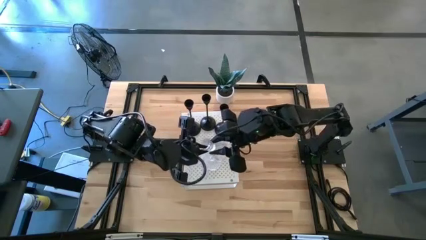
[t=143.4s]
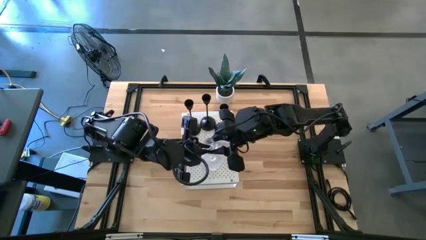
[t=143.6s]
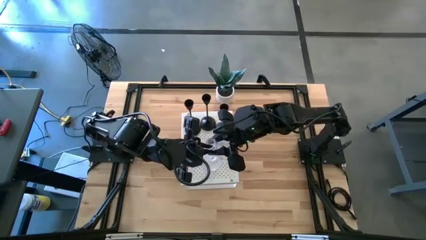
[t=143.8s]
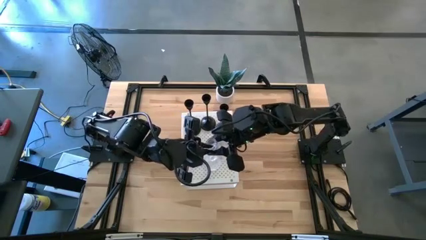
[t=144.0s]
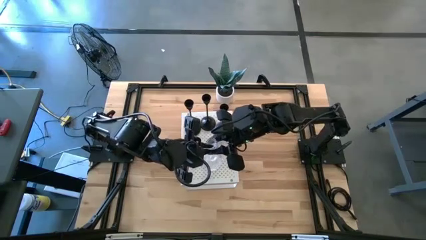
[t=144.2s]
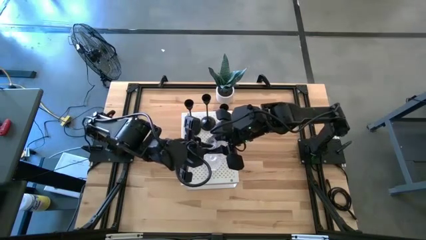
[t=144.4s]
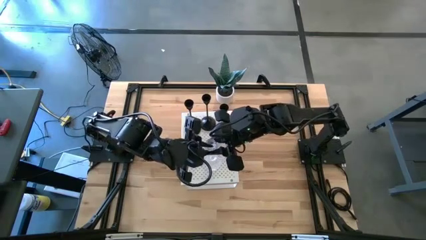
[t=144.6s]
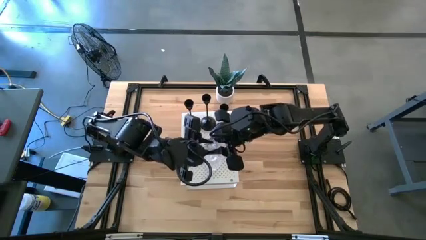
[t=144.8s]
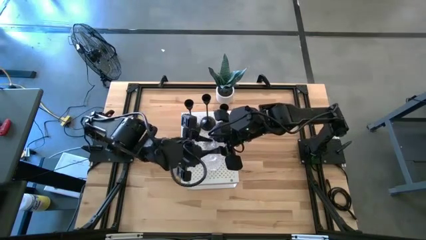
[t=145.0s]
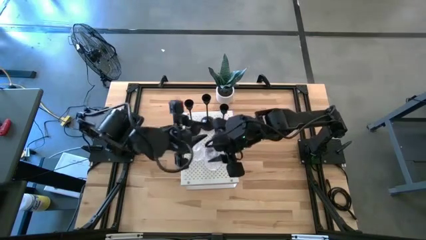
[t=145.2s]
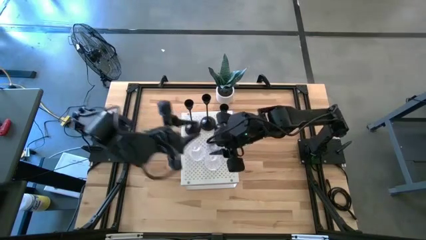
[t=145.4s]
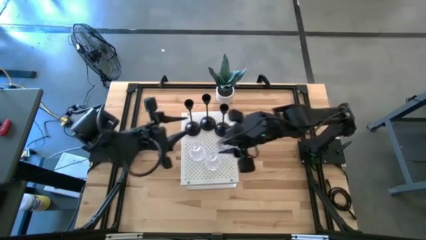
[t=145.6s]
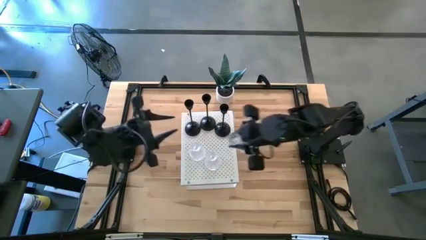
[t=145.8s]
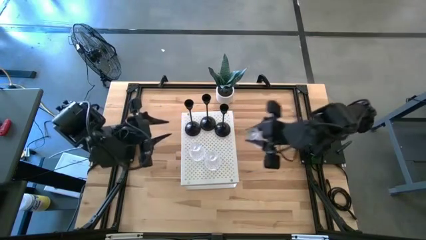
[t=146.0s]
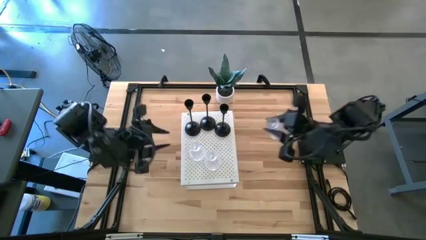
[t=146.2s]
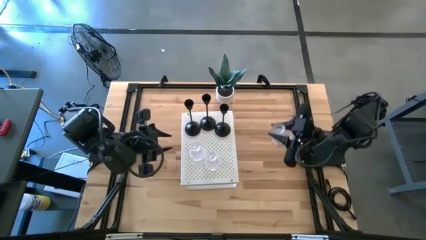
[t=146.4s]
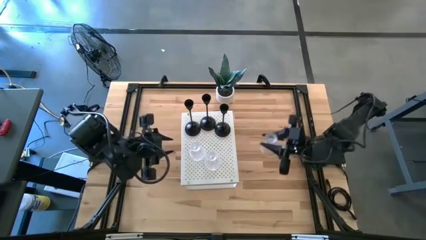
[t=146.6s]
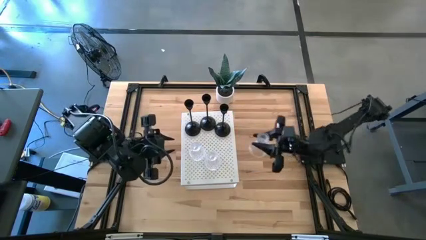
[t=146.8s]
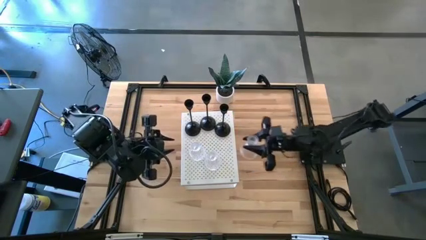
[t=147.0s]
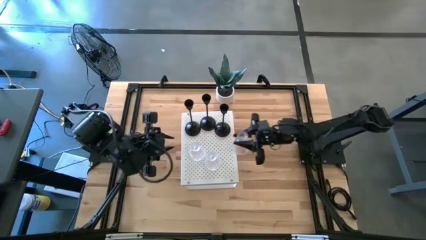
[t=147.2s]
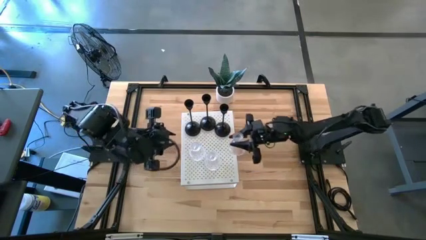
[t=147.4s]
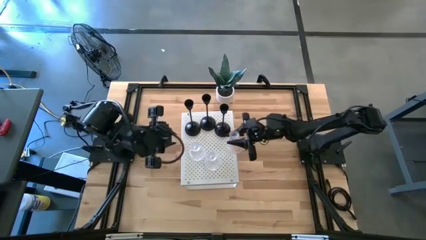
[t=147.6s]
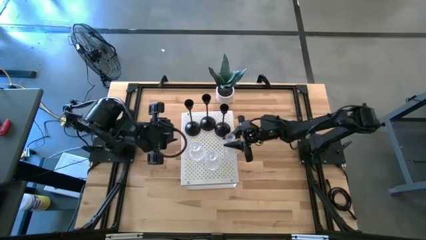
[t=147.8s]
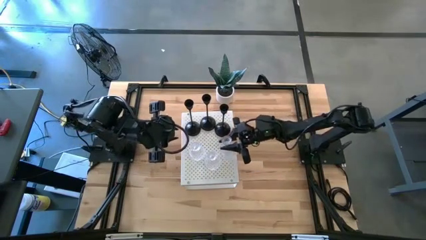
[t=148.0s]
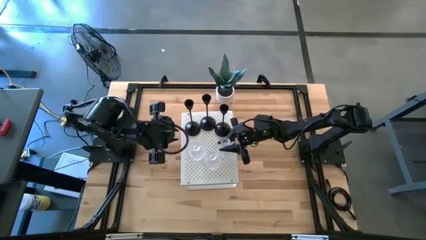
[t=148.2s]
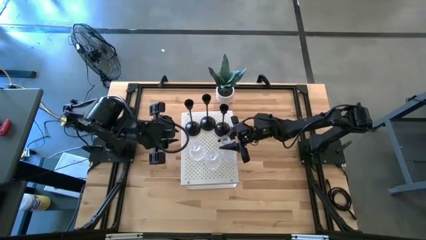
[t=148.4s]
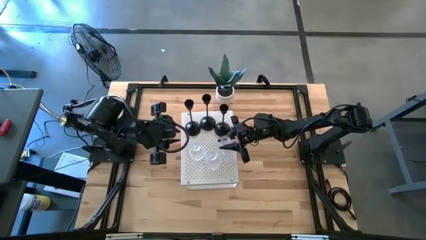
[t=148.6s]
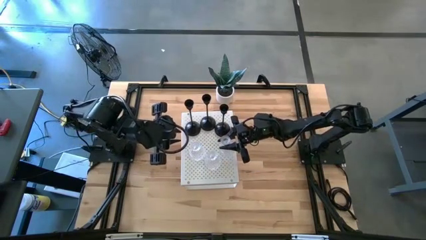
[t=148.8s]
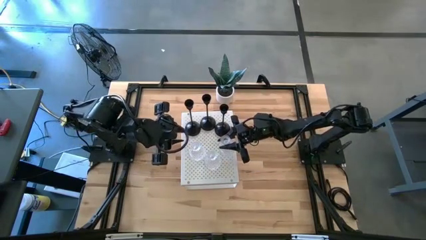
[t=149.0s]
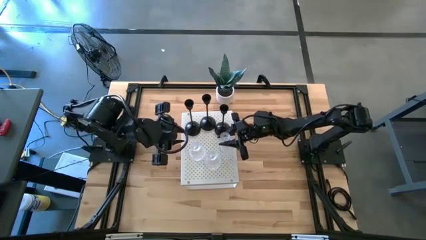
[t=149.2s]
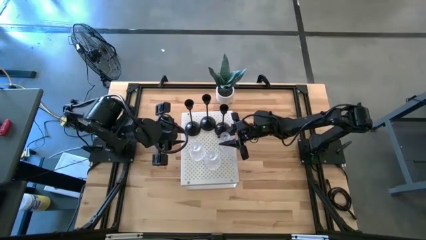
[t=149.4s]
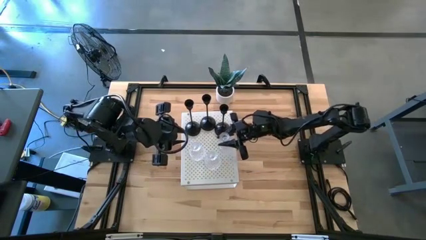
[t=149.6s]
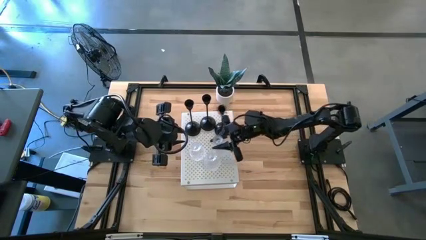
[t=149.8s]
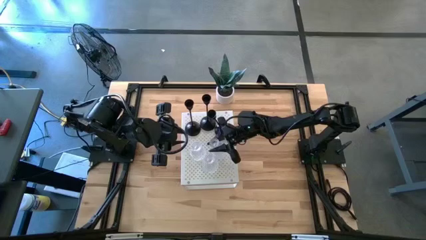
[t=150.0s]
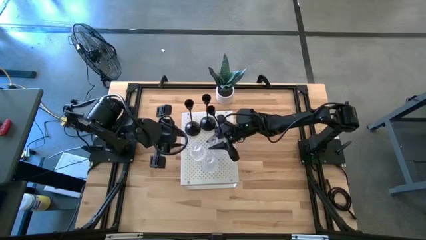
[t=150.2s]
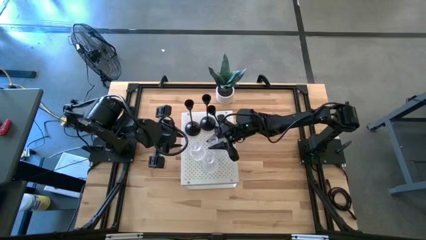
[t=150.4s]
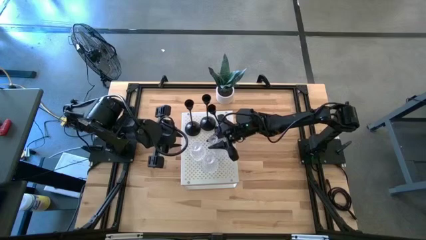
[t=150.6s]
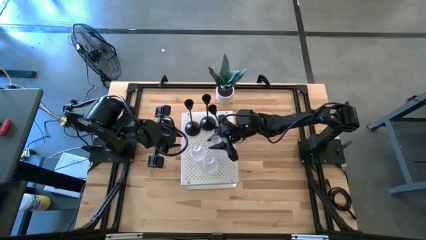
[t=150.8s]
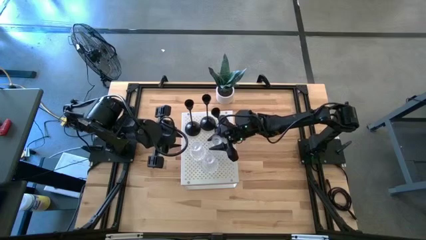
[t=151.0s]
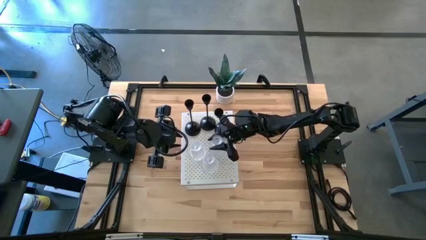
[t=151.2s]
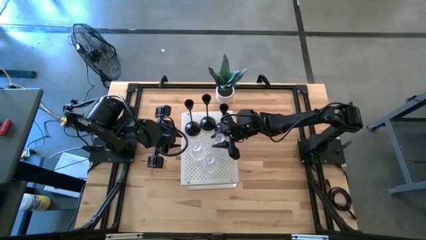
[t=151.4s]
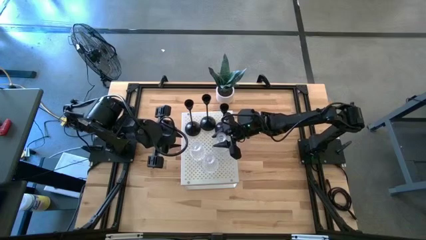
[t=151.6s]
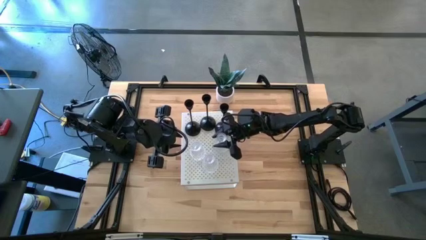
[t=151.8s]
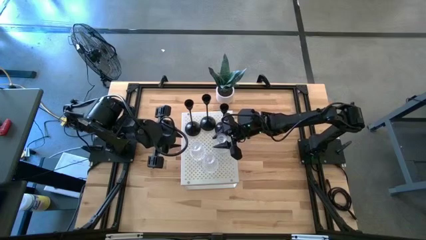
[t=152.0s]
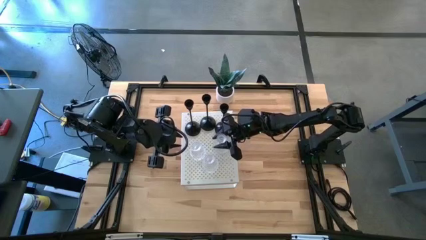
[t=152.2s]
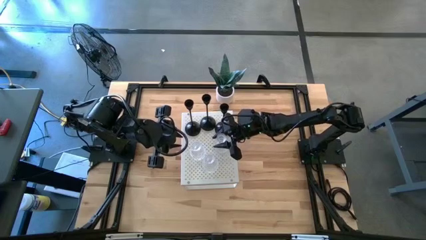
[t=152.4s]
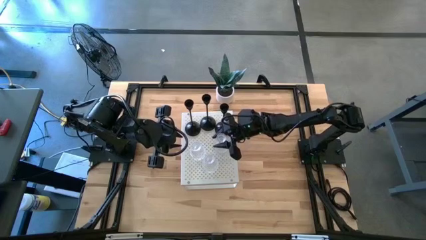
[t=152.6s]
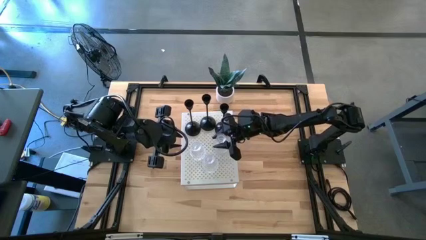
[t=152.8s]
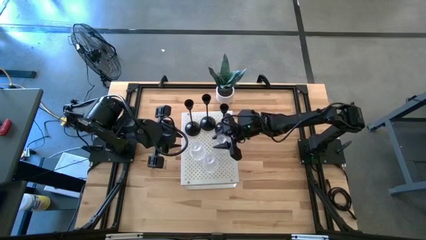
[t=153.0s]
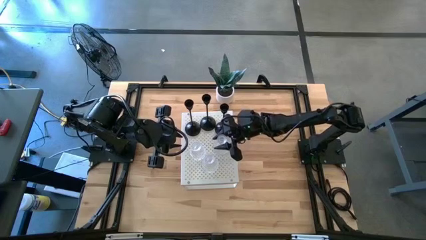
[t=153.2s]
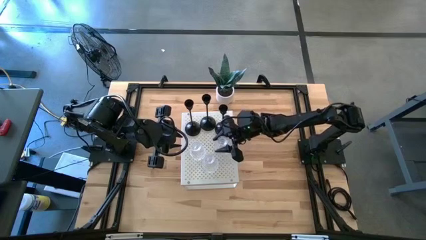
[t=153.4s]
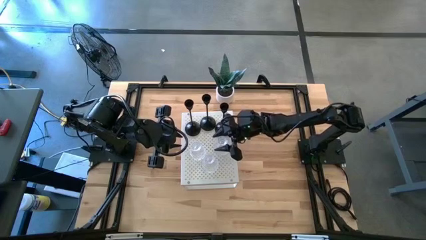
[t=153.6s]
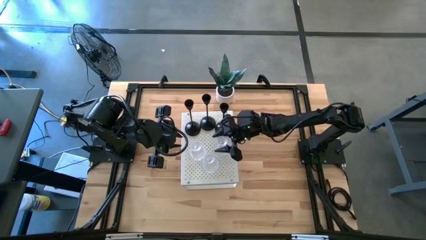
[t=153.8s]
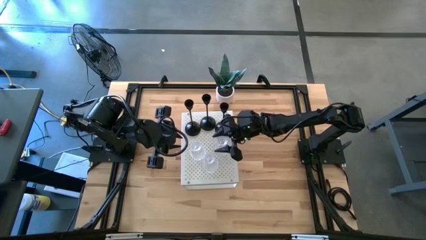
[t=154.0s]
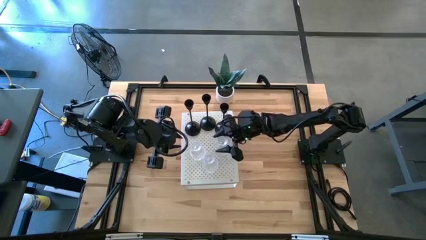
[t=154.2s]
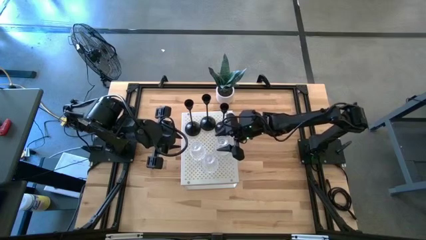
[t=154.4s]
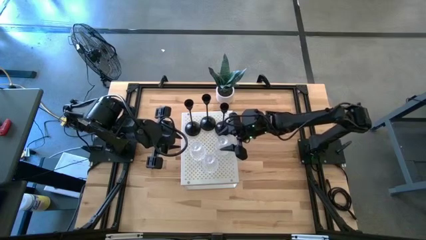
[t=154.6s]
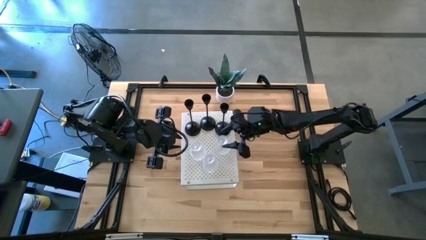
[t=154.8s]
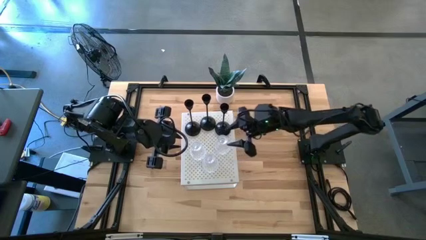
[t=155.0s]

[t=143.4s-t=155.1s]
Task: Pick & Place candle stick holders
Put the transparent glass candle holder on the shelf

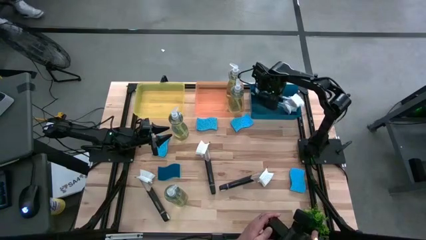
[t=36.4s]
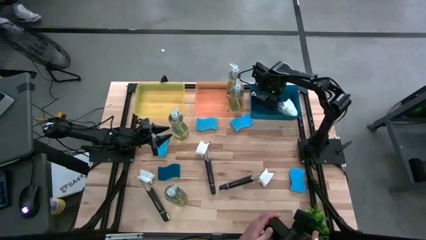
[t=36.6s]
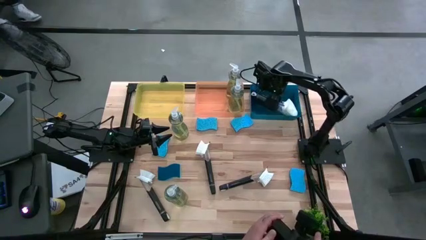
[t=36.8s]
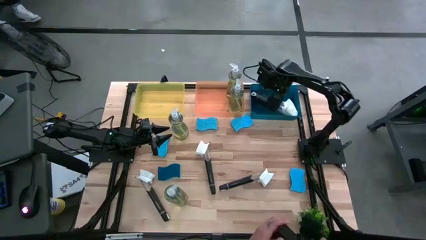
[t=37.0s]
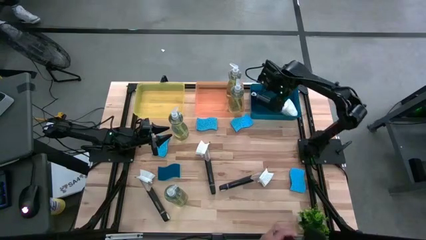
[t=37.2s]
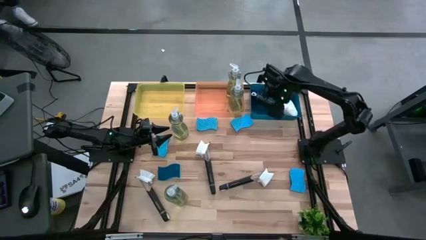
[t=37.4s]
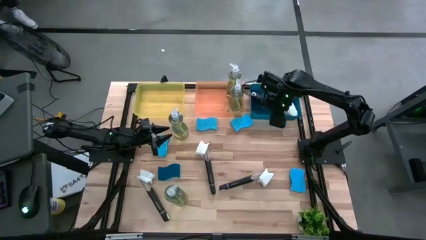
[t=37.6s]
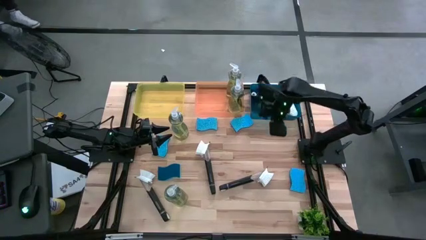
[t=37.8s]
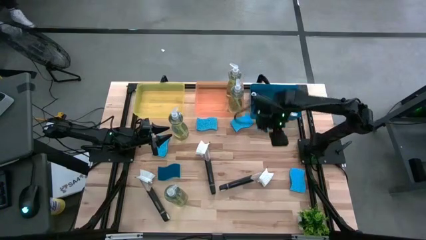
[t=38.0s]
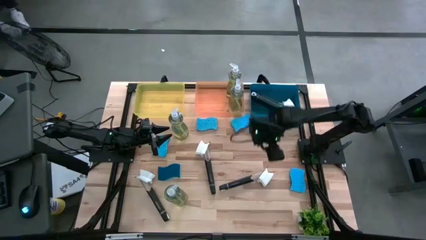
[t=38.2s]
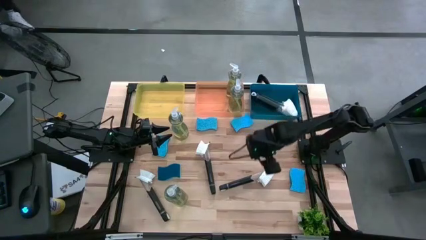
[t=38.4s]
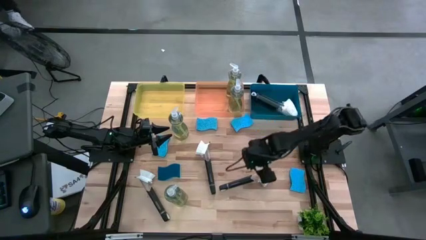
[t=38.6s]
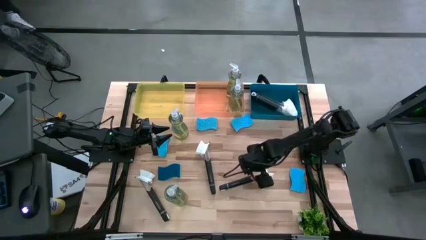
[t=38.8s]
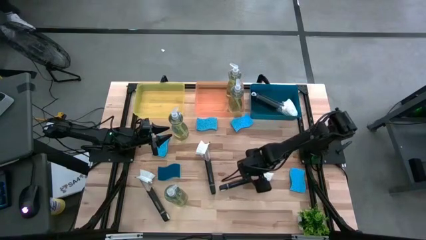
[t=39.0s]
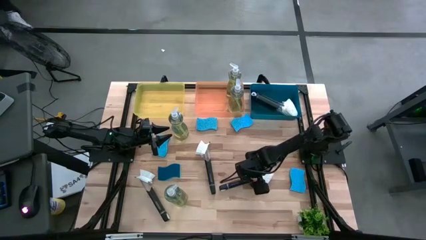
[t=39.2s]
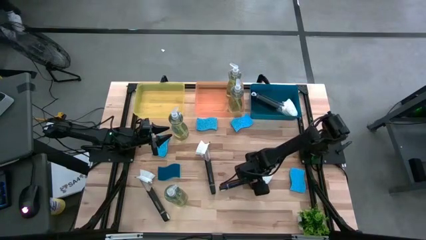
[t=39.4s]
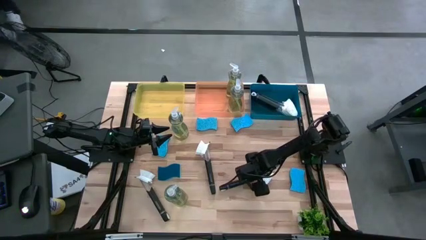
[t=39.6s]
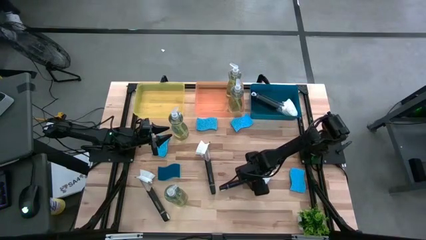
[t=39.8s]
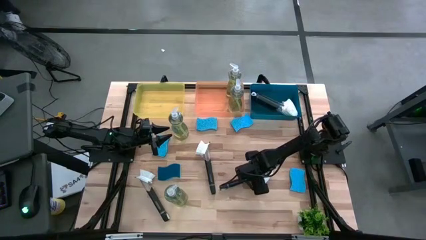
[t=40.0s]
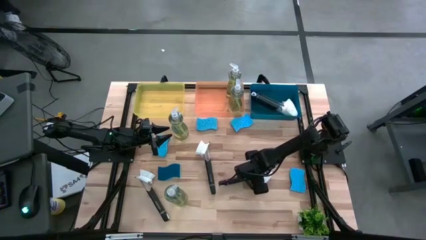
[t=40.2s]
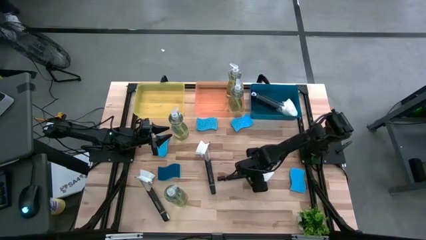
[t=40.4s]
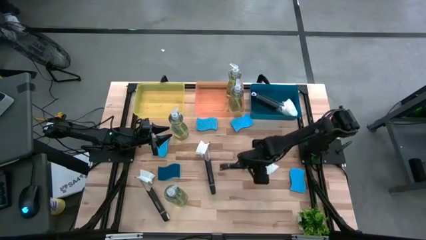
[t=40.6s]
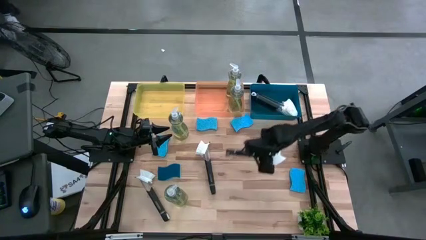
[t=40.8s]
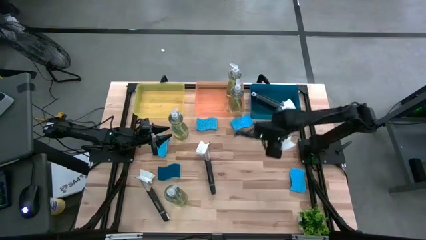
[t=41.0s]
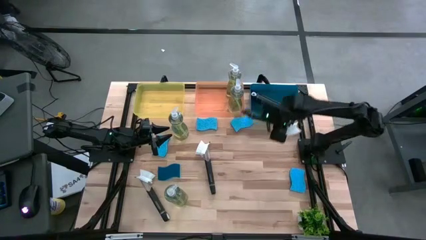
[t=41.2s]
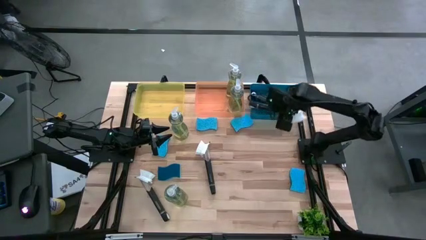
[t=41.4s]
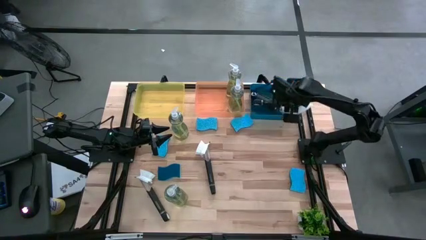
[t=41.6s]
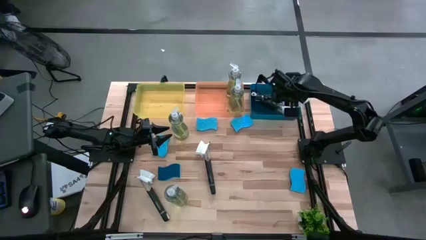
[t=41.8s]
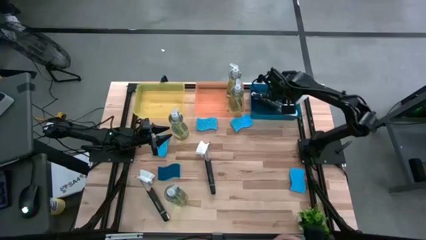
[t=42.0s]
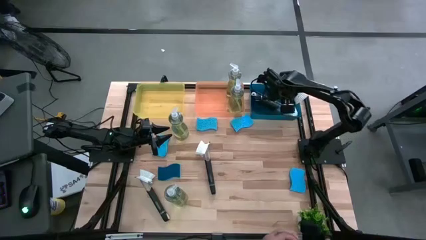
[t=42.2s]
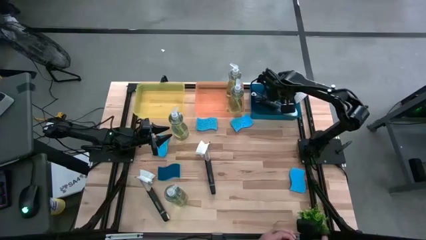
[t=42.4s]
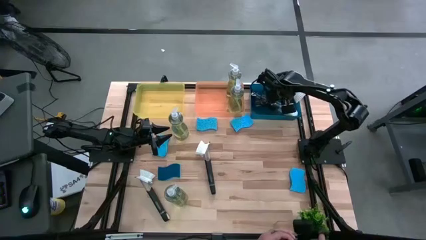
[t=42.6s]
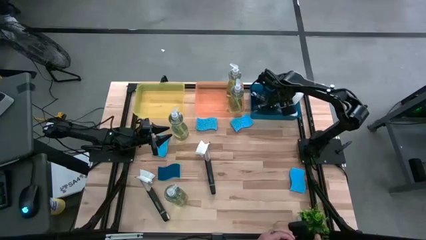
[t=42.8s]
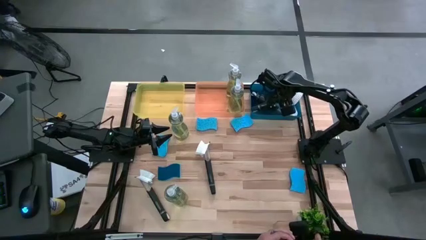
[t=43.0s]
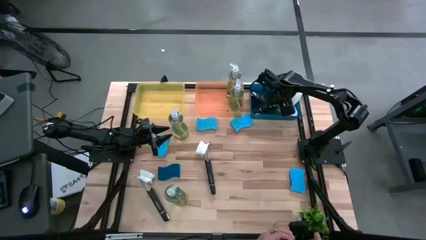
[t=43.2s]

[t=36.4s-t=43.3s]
Task: Pick & Place Kitchen Sink Supplies
Put the black dish brush into the blue bin
